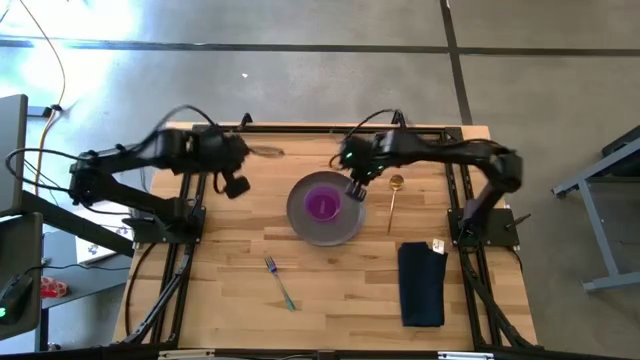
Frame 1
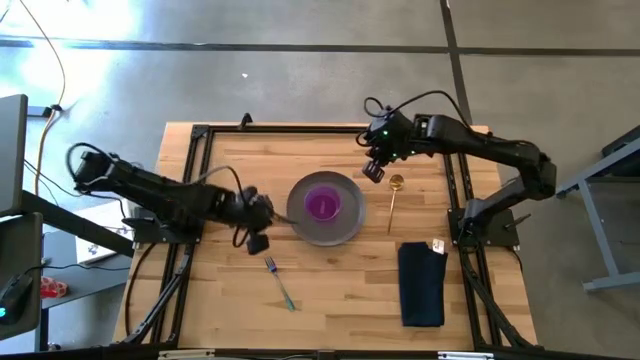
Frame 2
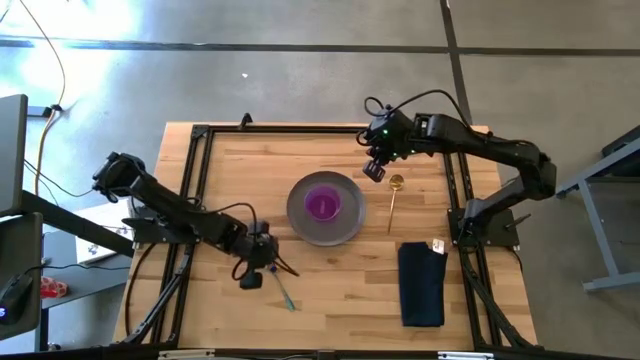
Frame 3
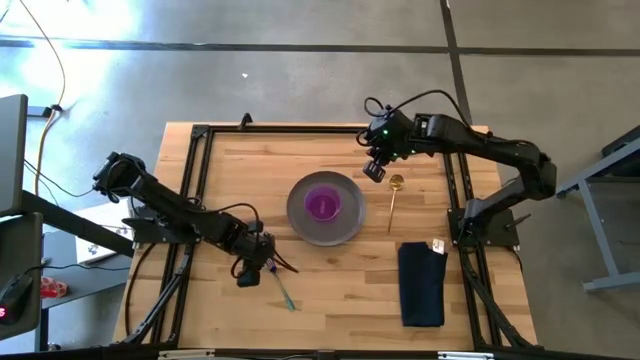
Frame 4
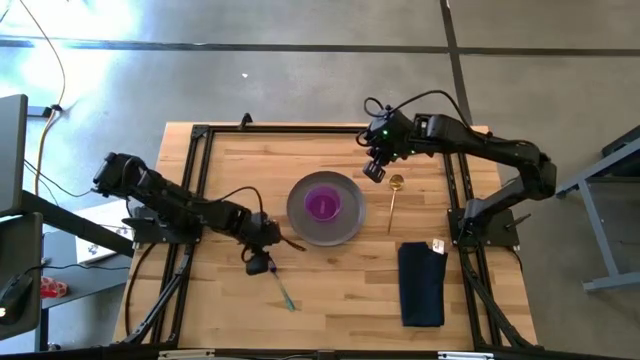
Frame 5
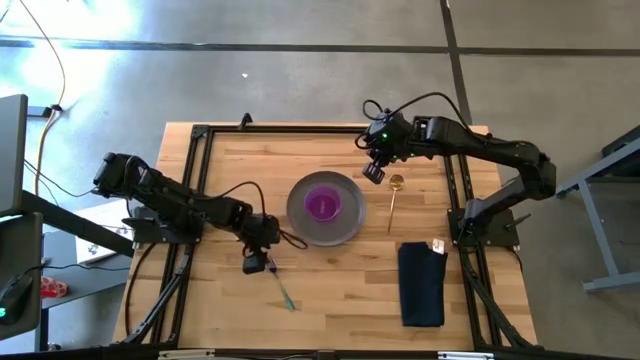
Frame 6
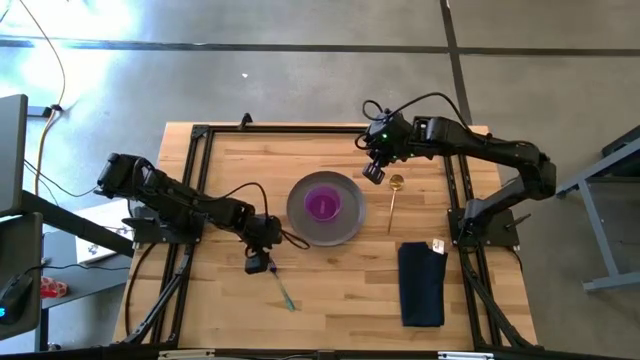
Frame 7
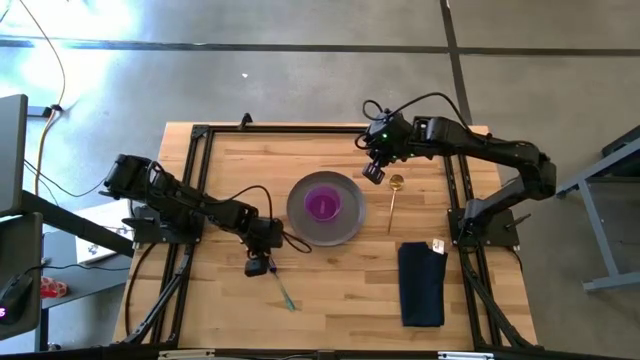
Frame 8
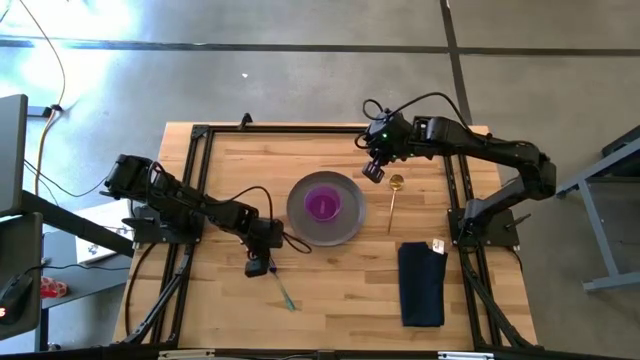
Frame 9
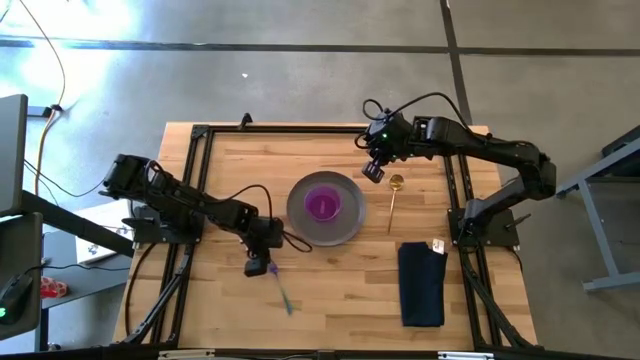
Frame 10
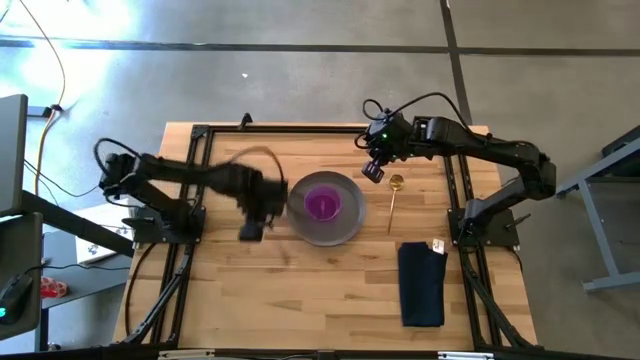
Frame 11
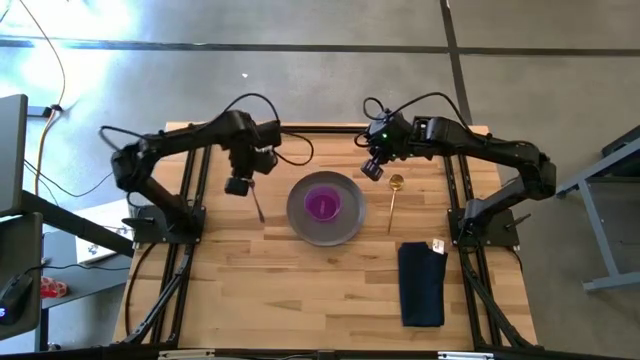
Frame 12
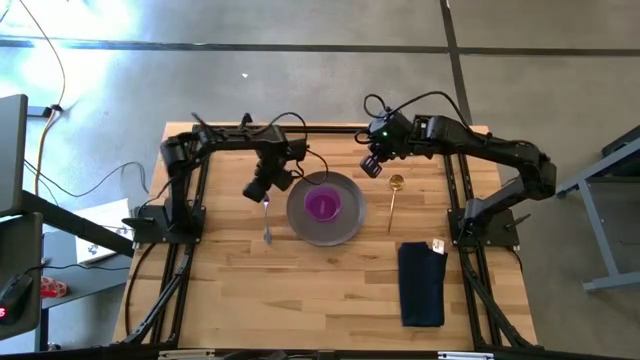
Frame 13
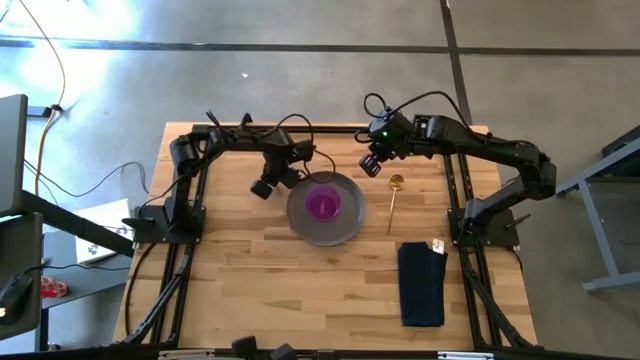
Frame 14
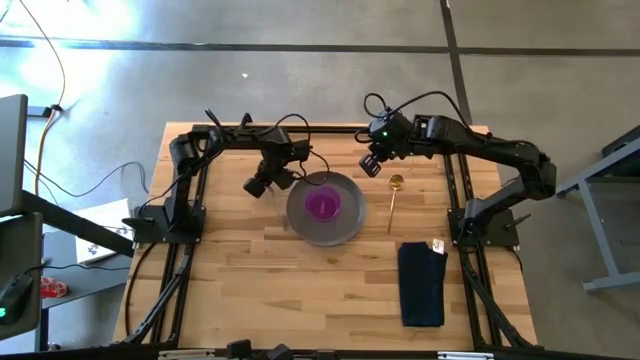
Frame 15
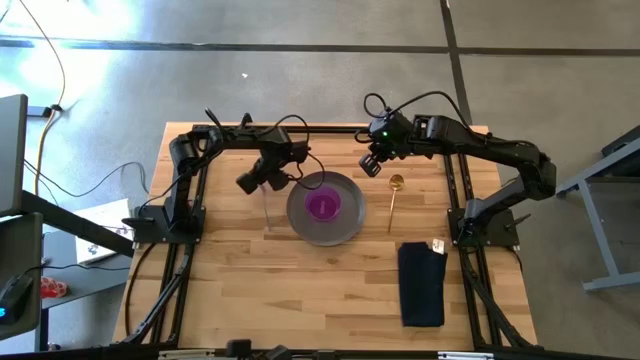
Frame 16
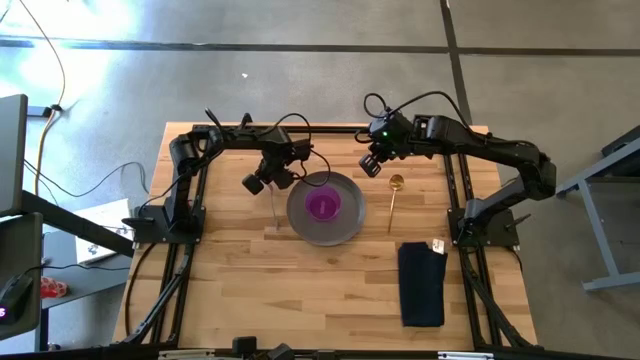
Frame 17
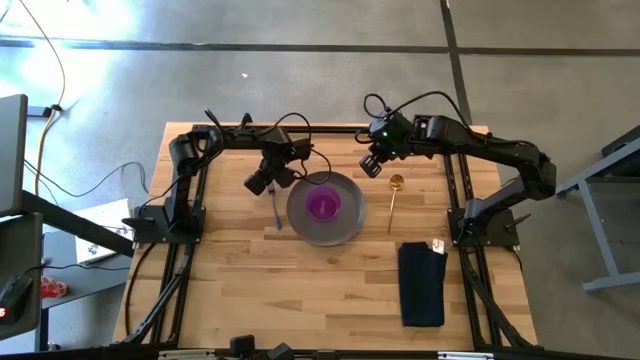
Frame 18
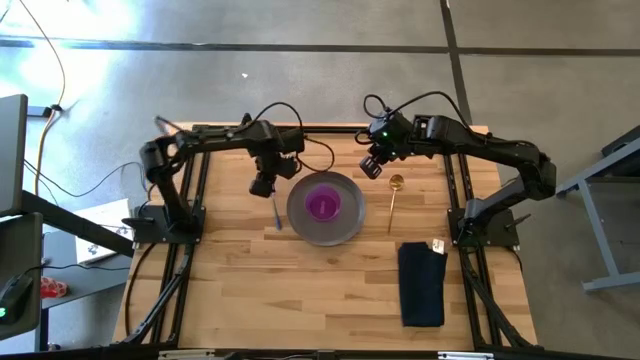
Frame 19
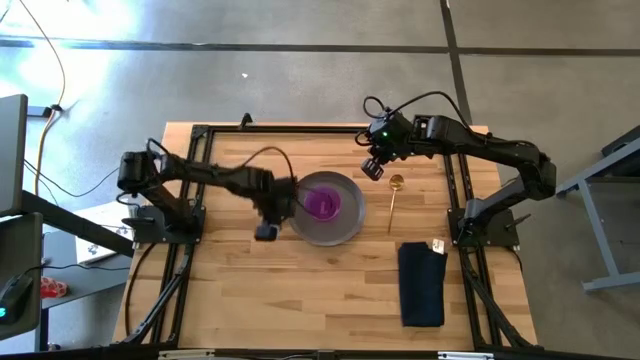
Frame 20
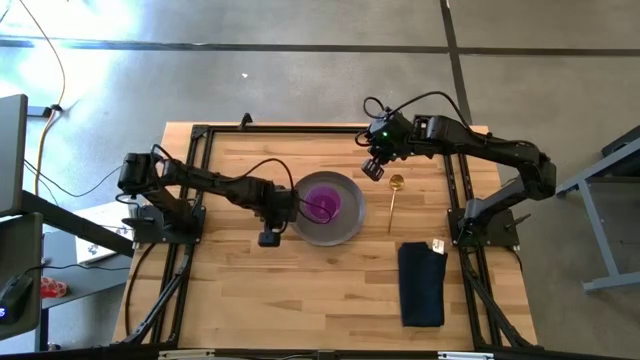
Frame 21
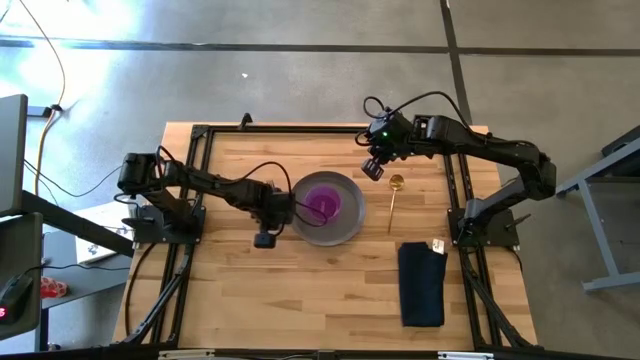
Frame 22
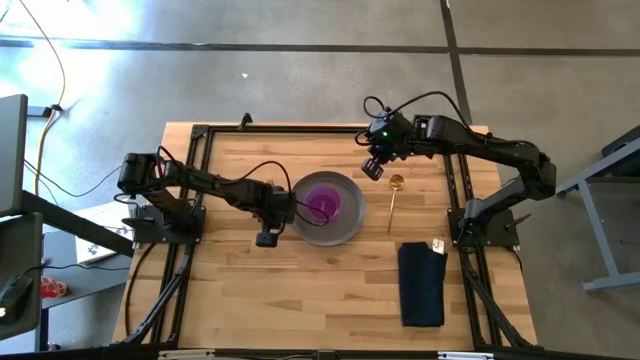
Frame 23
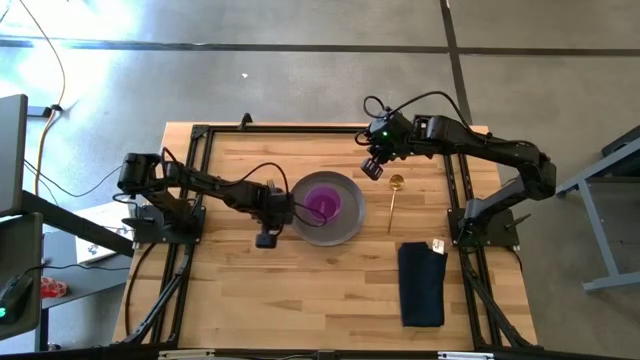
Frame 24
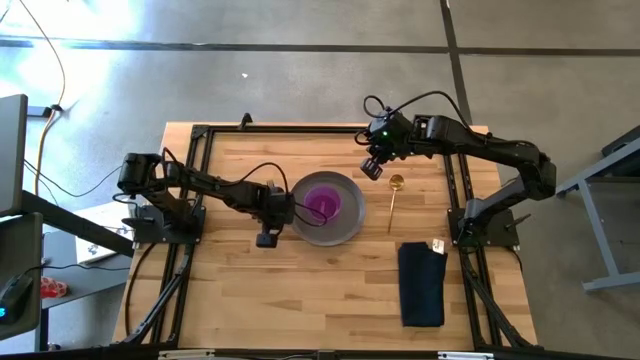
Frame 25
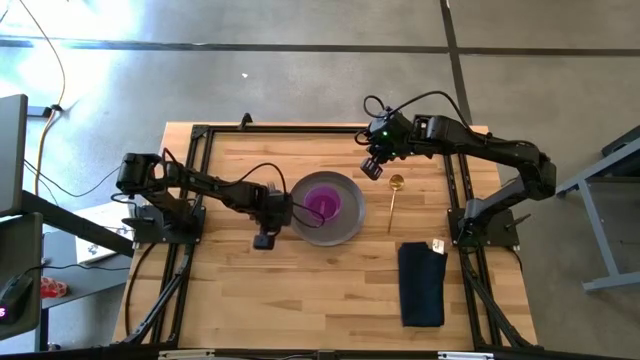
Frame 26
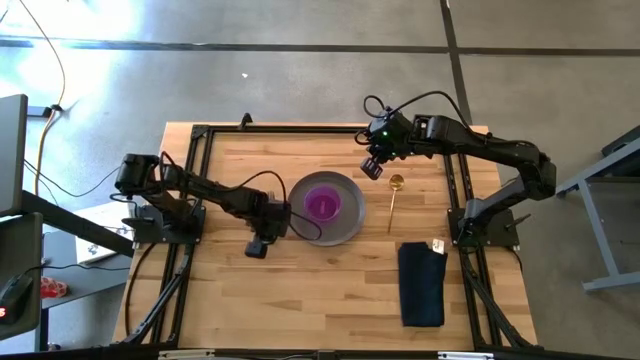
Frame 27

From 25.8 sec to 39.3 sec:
Task: Set table place
Put the fork to the left of the gray plate

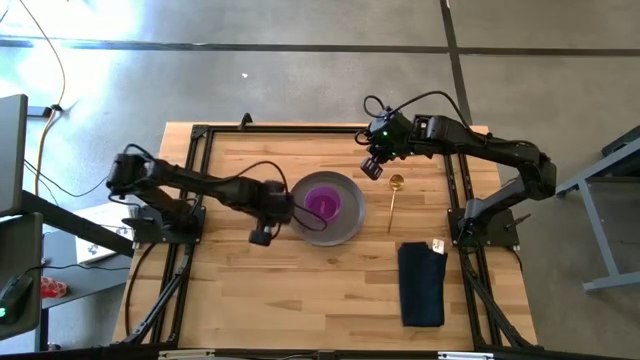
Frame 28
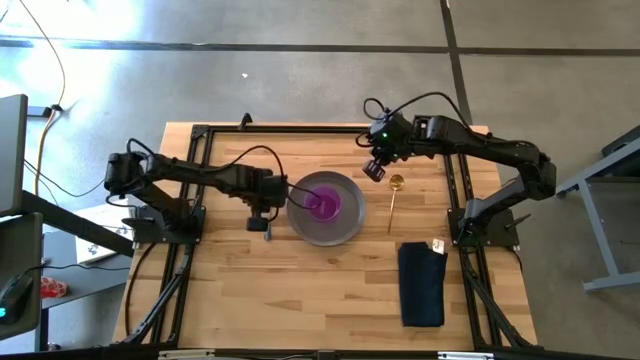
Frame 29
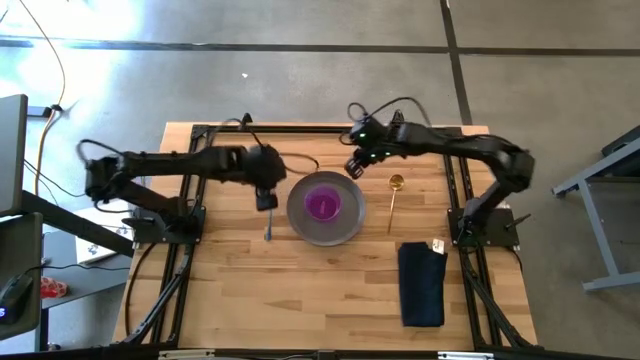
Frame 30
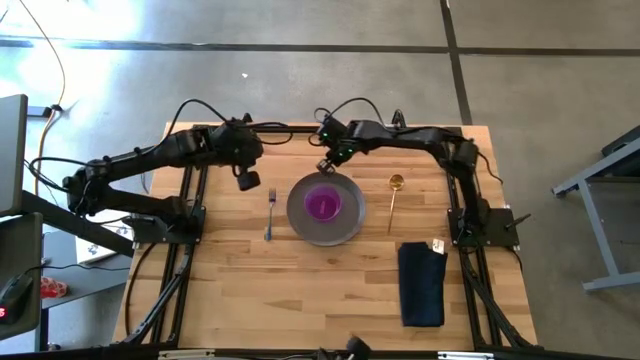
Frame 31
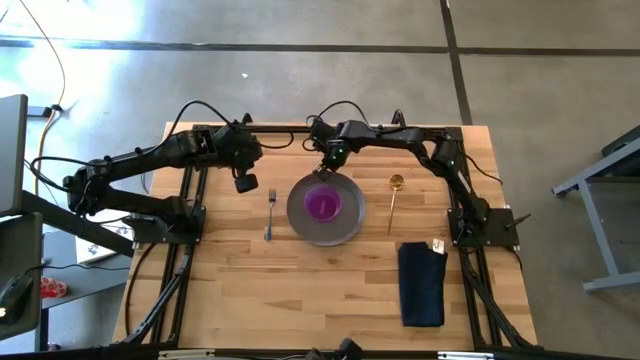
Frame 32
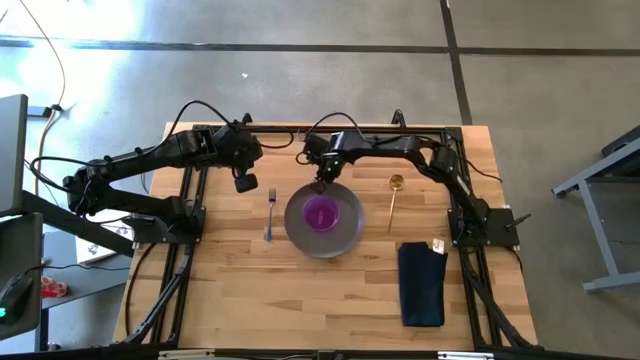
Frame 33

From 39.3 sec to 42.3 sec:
Adjust the gray plate

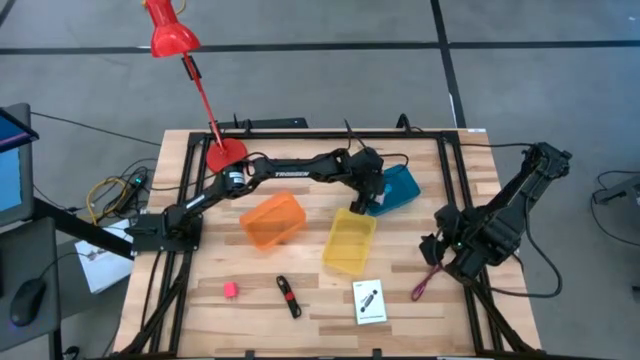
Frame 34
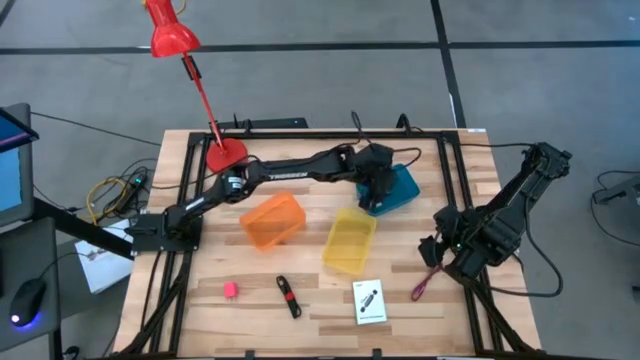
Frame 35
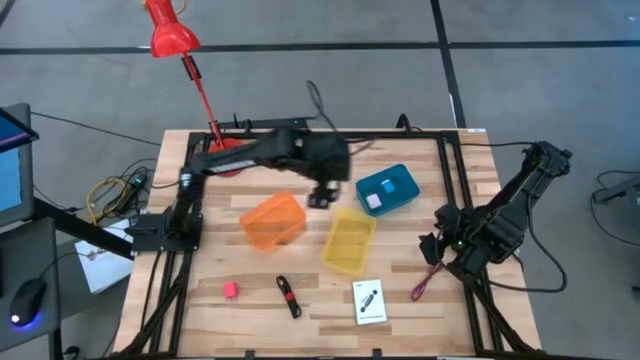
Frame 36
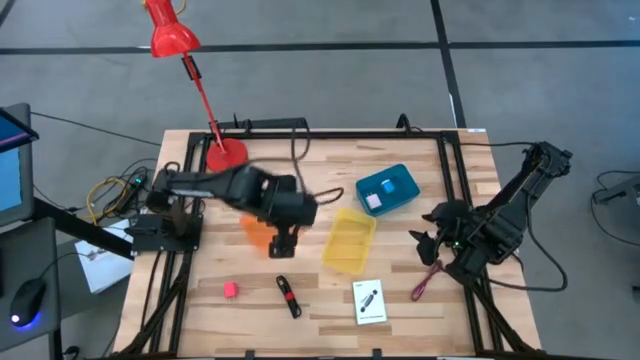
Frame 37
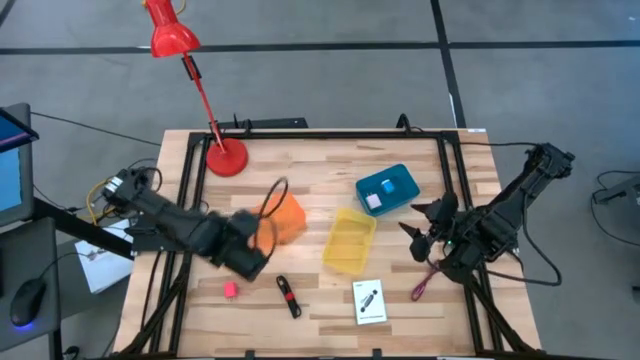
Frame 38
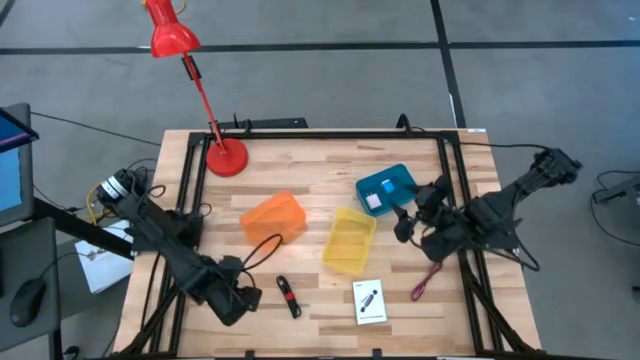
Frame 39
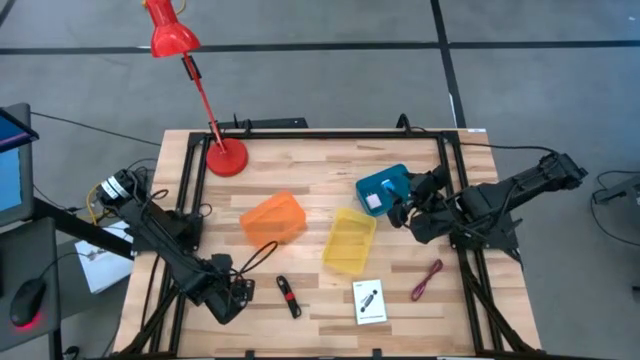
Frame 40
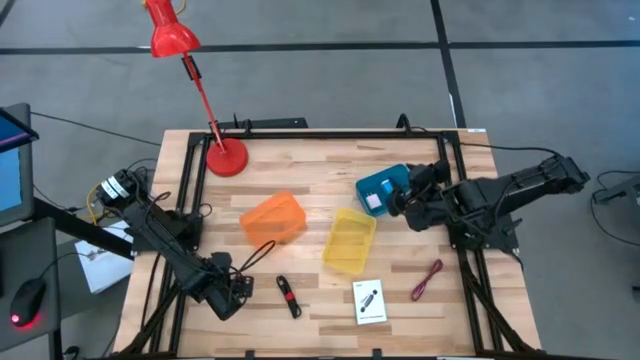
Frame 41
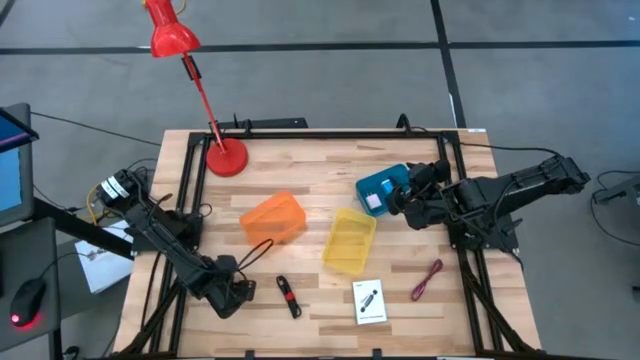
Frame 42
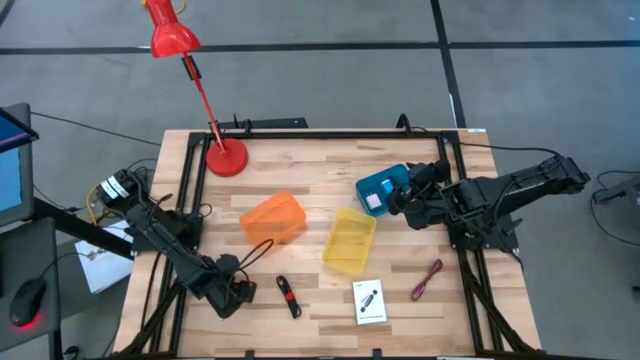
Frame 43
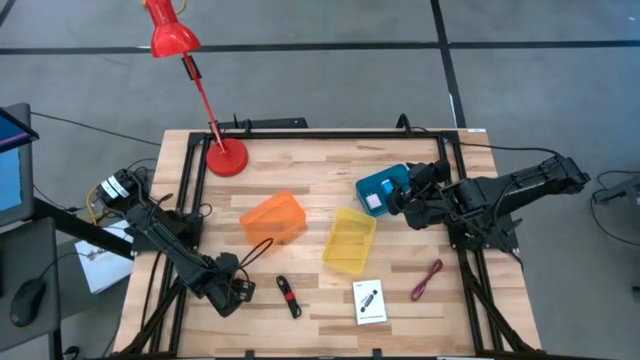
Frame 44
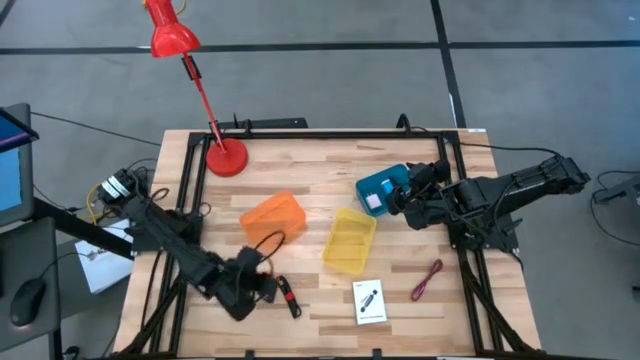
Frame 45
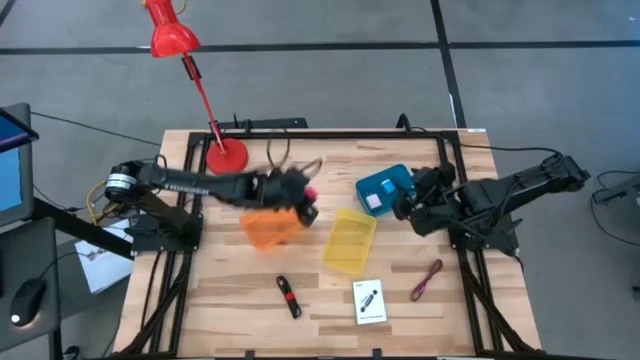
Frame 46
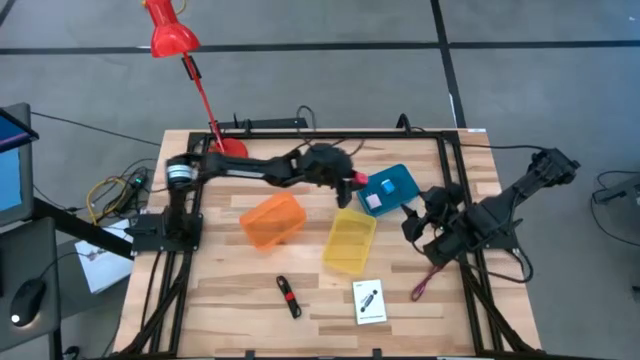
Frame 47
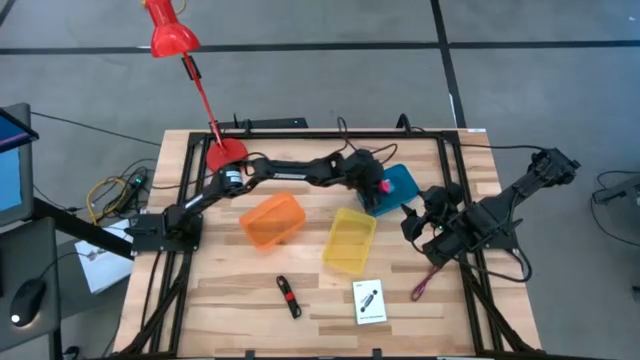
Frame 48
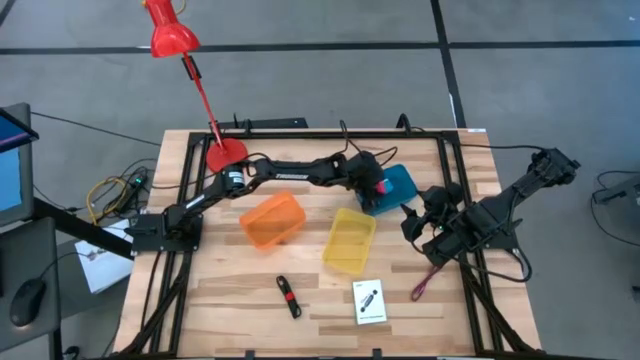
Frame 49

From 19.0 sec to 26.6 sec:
Task: Pick and place items into bin
Put the pink charger adapter into the blue bin
